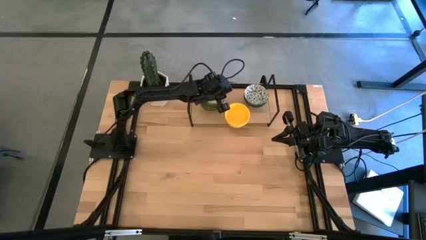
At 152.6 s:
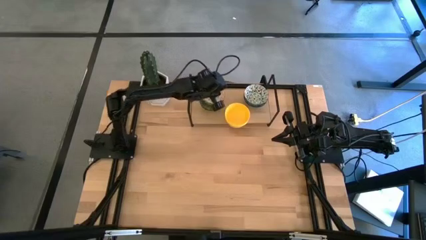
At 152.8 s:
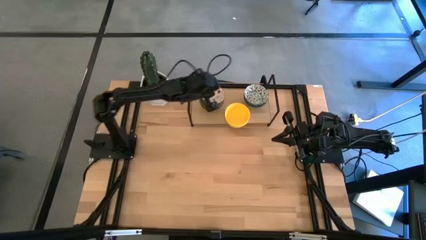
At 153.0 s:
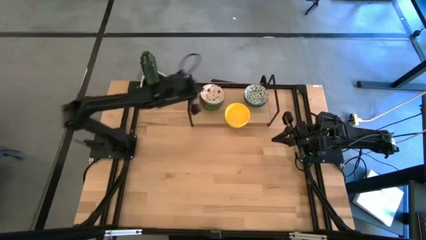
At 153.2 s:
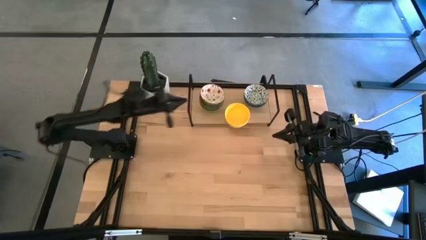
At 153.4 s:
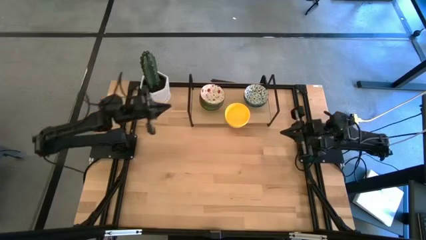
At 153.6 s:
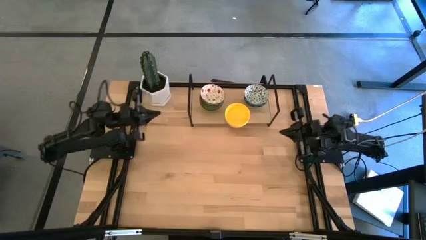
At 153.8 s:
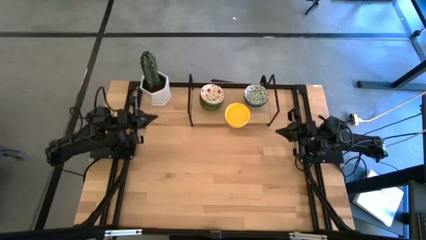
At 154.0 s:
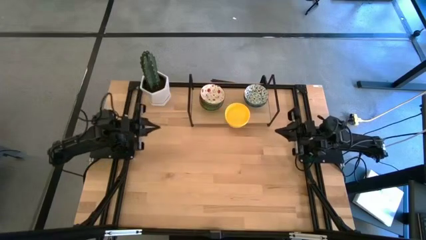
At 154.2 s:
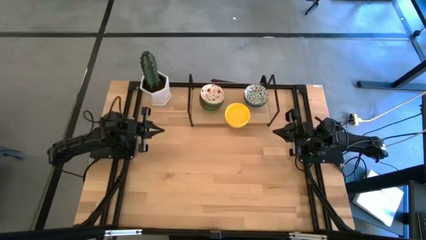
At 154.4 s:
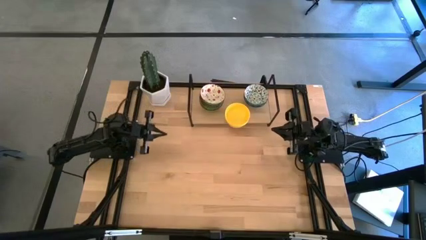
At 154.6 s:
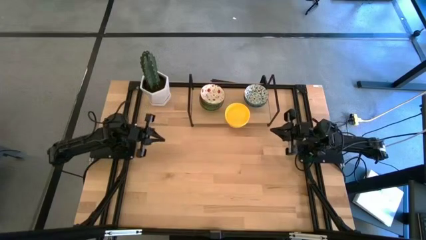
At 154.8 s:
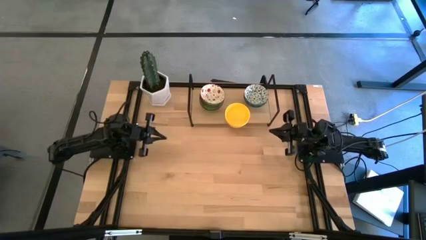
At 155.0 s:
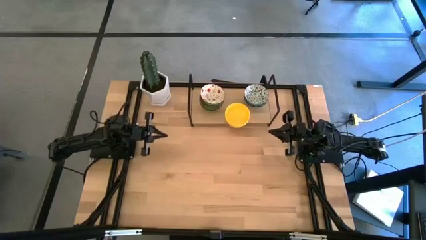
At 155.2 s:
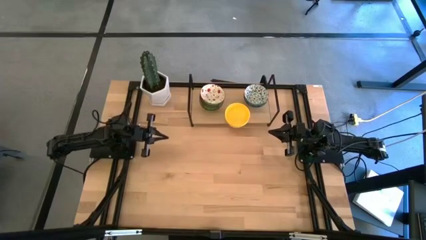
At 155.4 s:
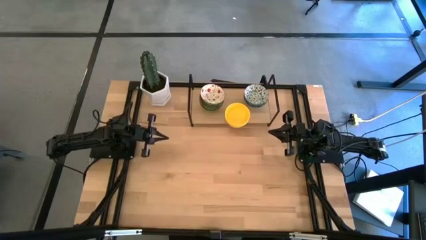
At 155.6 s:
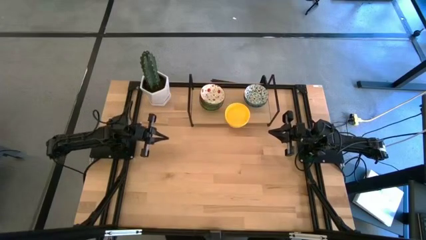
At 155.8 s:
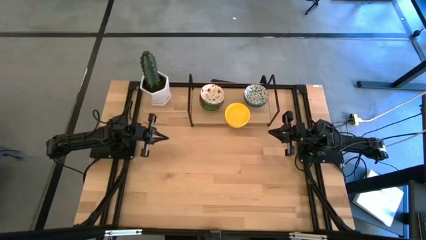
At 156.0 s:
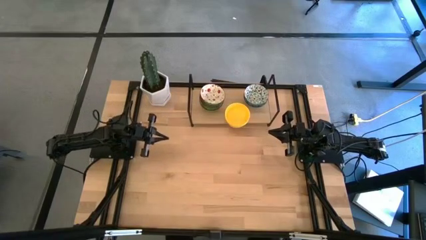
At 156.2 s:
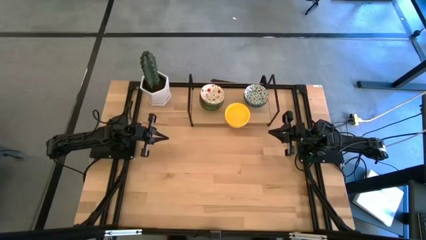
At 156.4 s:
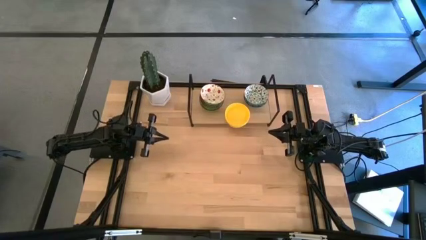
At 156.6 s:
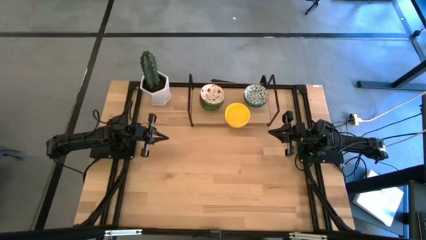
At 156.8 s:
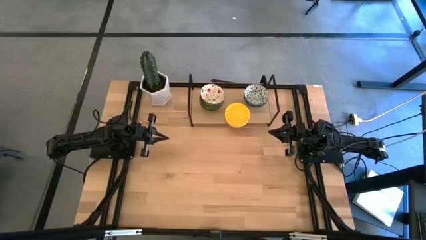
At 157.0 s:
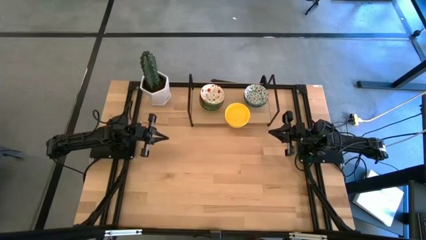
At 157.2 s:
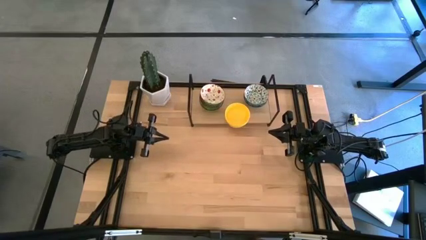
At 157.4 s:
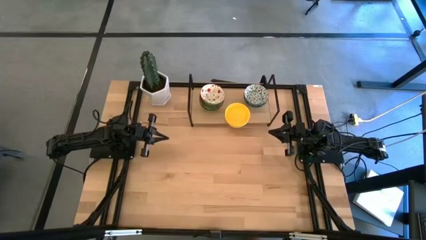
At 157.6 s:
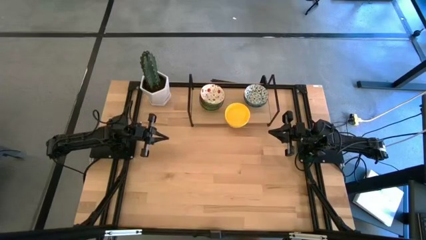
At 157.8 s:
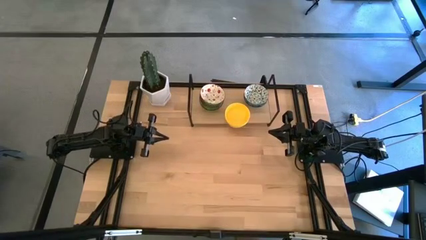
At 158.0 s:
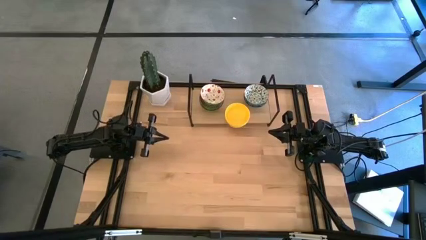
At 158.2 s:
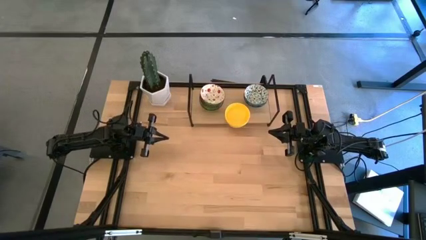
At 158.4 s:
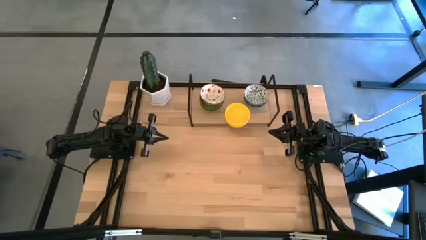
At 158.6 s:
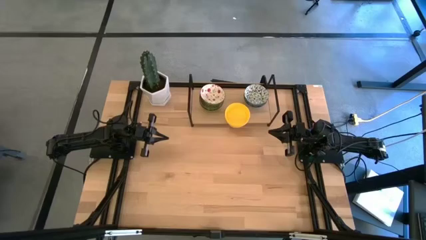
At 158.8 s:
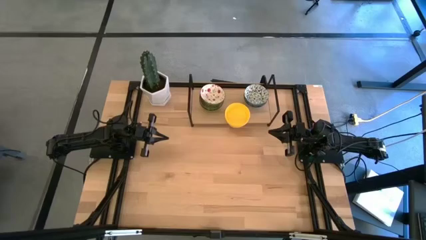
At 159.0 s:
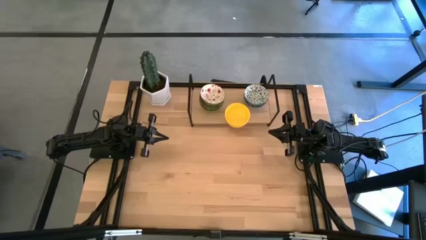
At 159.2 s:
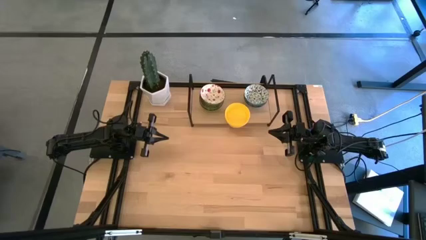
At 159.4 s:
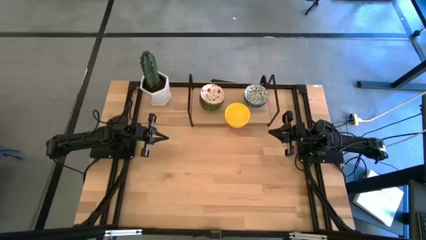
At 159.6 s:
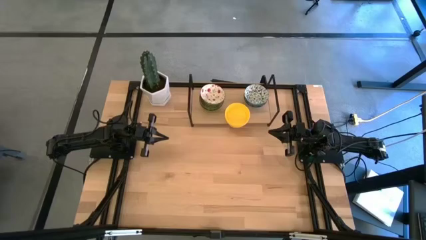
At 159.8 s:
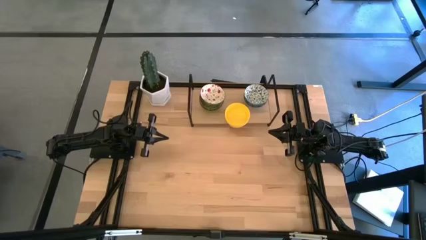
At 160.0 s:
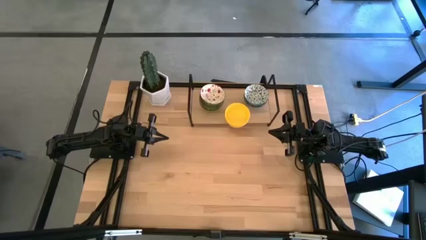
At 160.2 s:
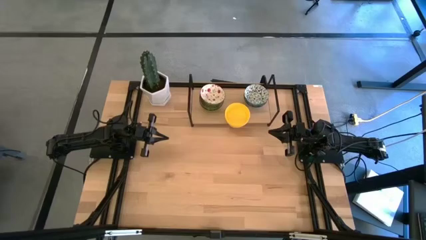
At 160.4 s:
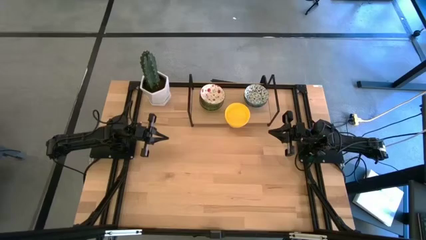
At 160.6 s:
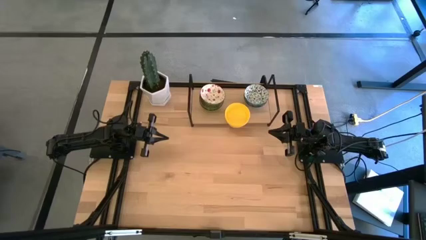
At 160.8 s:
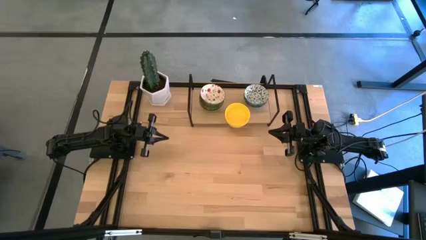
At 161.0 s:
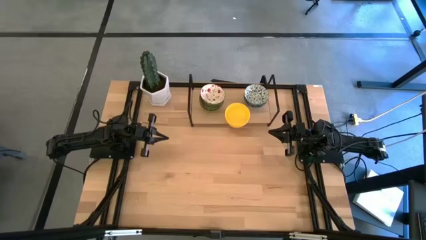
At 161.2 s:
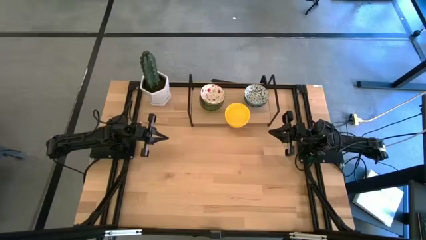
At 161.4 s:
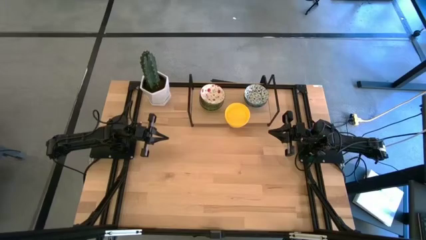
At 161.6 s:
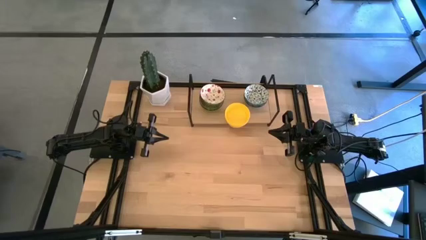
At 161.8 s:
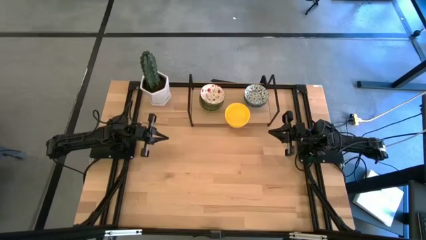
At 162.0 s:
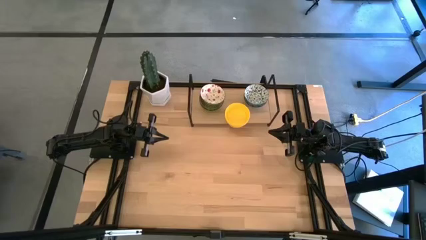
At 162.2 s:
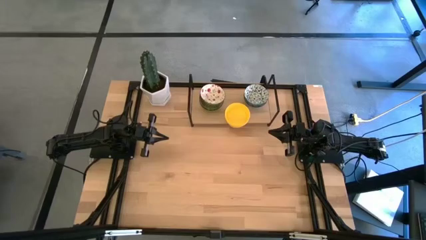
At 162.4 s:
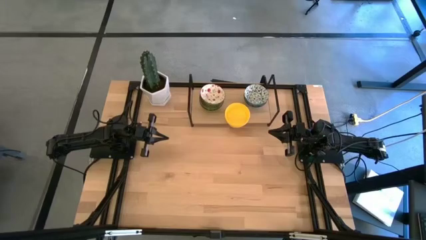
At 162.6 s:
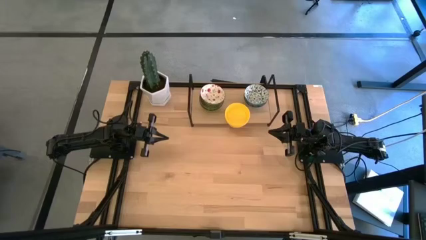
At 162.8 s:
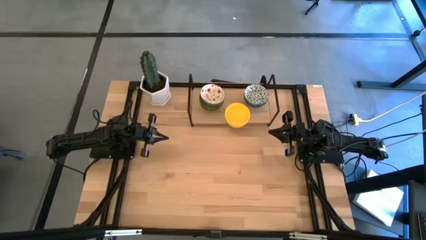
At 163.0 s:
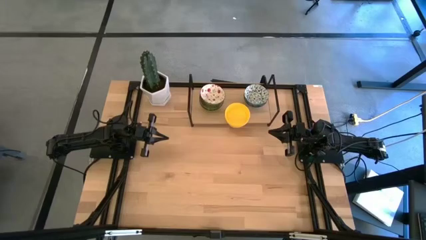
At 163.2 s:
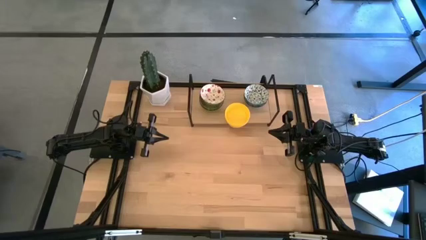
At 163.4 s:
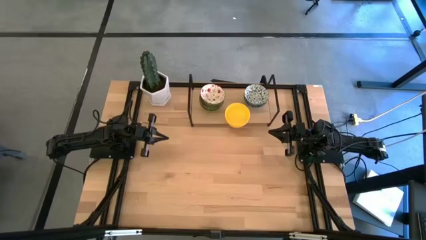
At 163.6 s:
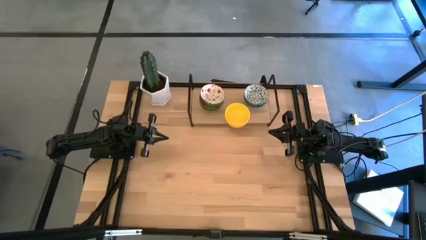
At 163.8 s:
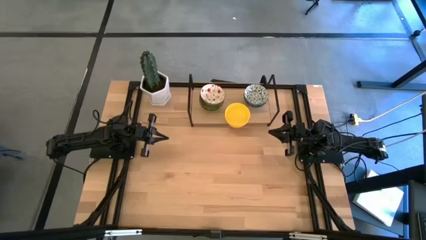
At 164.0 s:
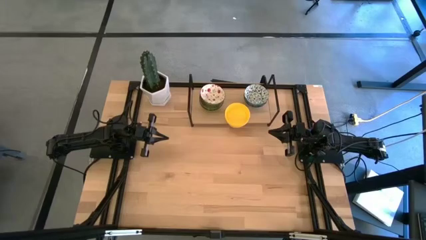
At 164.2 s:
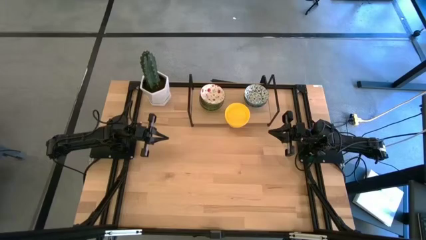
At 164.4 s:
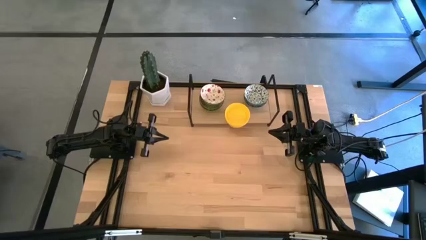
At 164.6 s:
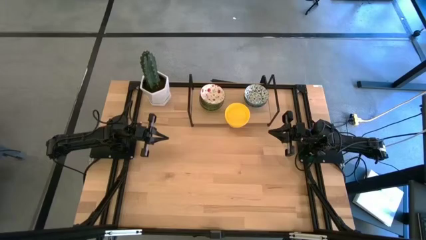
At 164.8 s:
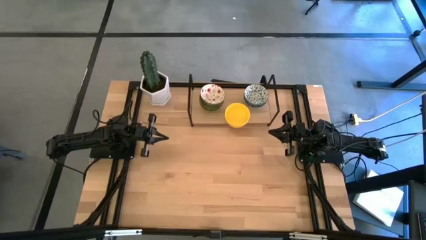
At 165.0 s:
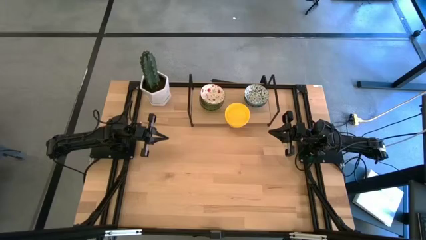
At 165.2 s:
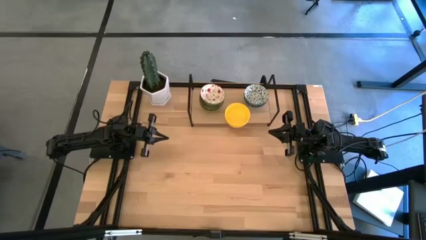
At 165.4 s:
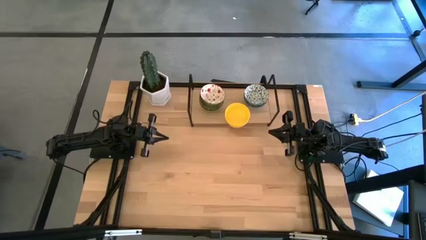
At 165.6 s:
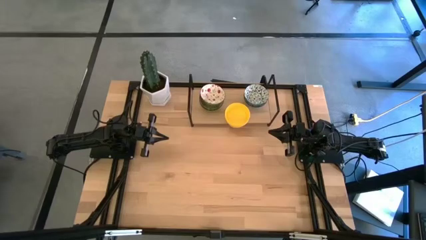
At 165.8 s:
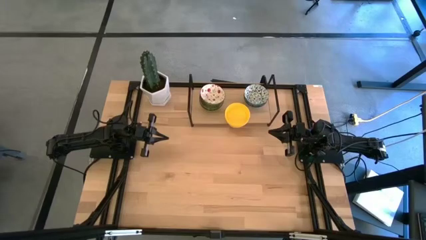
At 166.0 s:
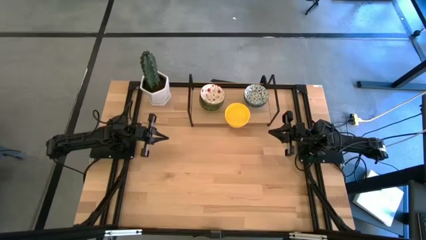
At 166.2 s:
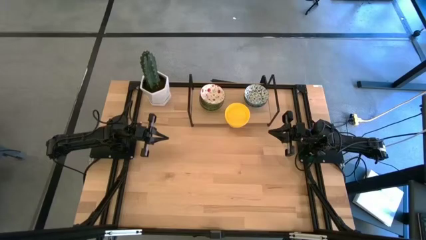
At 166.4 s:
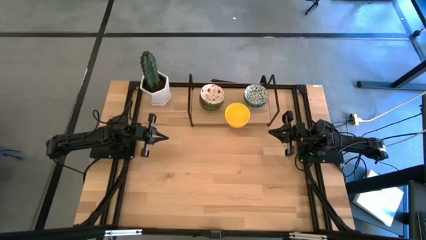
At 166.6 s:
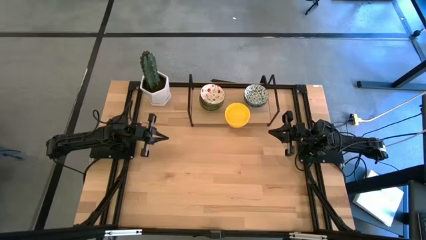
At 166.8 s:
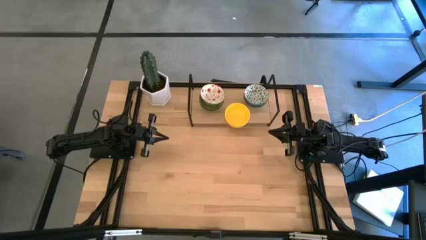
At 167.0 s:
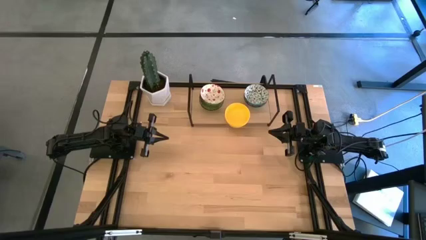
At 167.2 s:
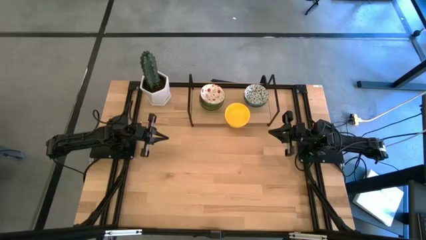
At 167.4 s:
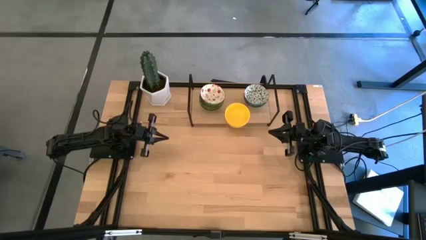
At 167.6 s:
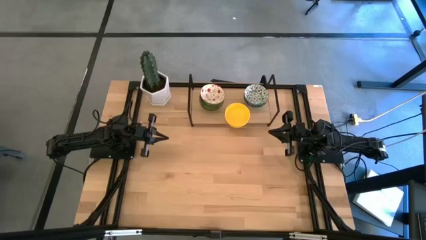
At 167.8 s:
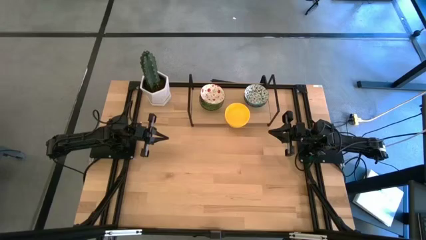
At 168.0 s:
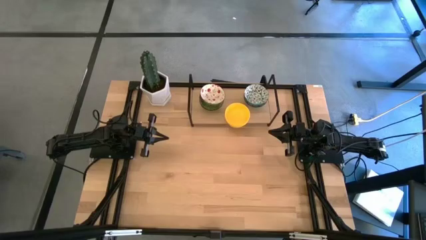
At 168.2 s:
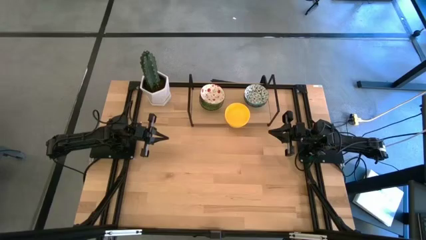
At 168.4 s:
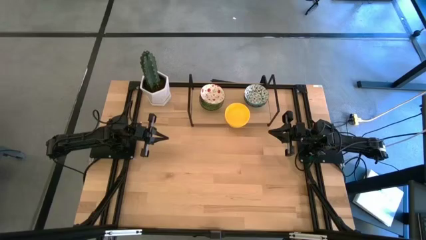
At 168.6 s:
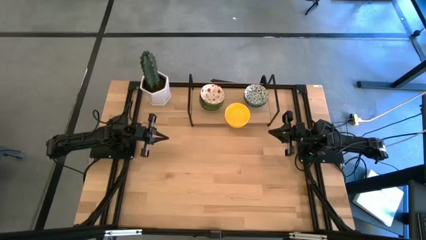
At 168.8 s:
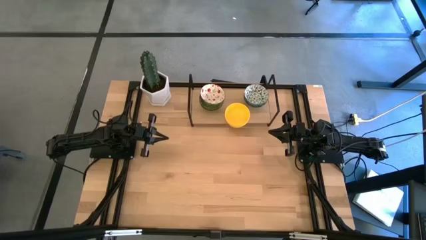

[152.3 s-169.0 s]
Task: Pick & Place Mini bowls
Return to Home Position
